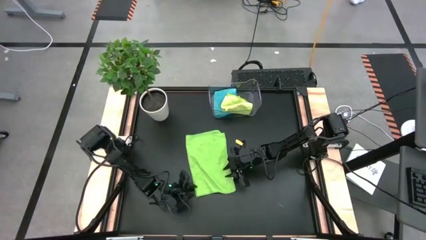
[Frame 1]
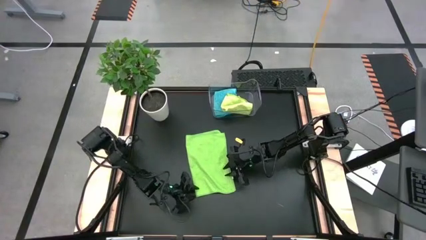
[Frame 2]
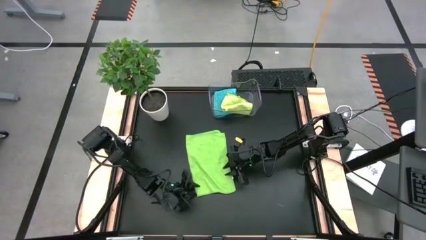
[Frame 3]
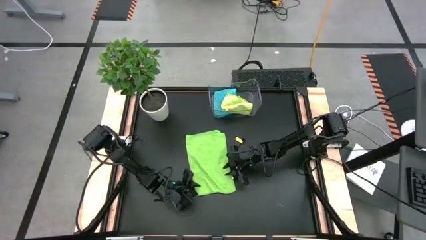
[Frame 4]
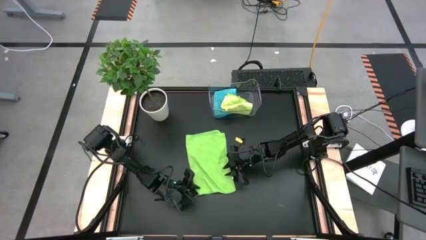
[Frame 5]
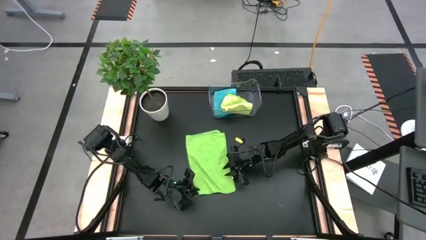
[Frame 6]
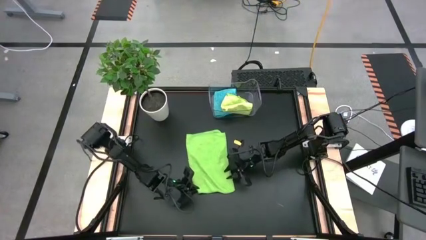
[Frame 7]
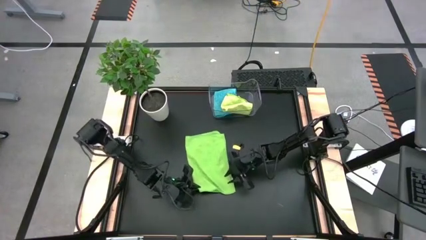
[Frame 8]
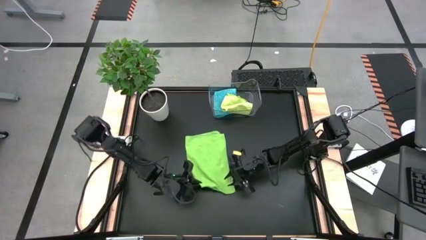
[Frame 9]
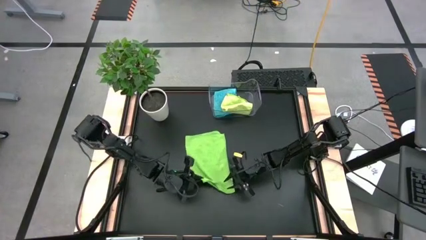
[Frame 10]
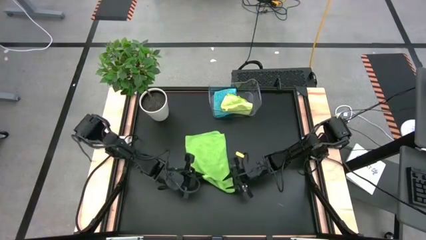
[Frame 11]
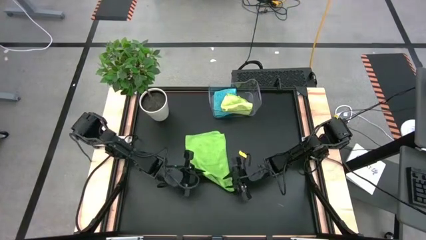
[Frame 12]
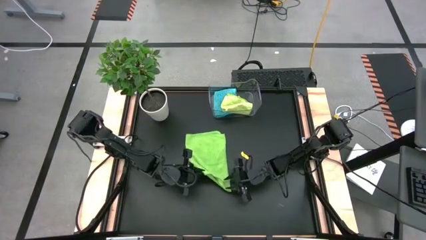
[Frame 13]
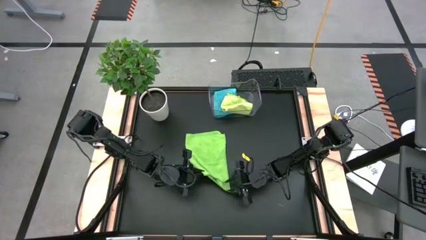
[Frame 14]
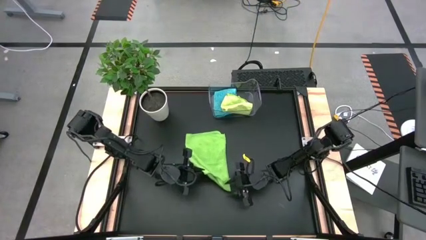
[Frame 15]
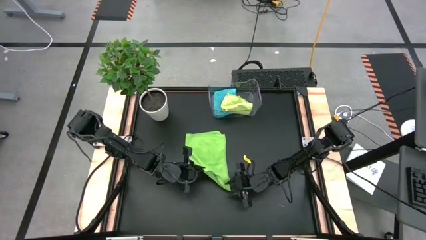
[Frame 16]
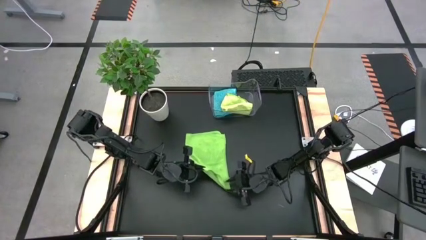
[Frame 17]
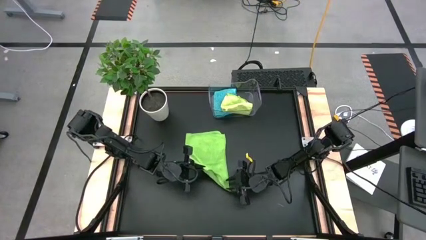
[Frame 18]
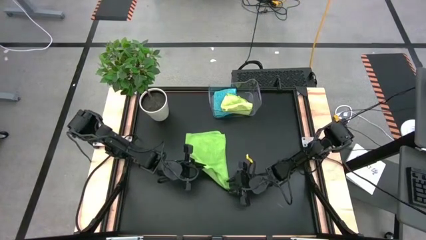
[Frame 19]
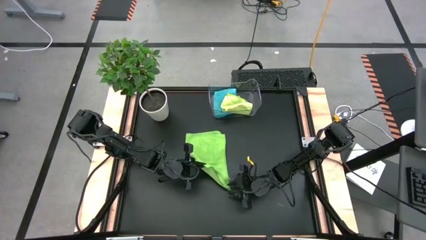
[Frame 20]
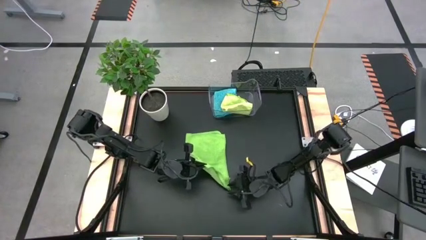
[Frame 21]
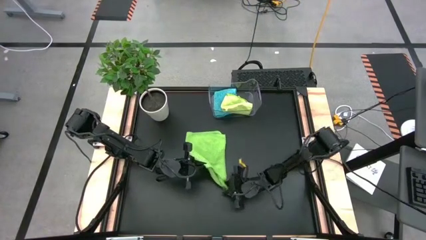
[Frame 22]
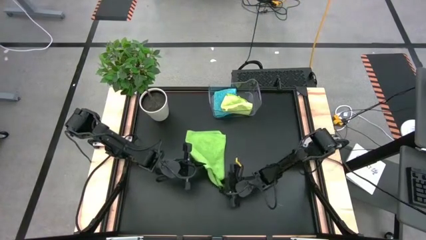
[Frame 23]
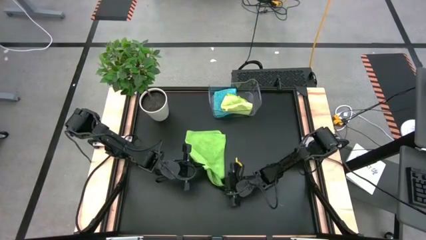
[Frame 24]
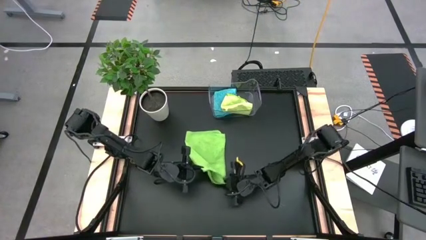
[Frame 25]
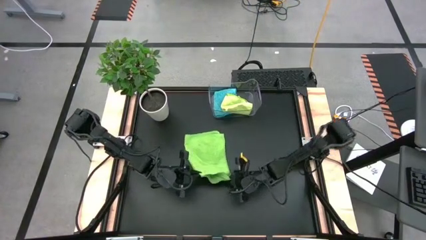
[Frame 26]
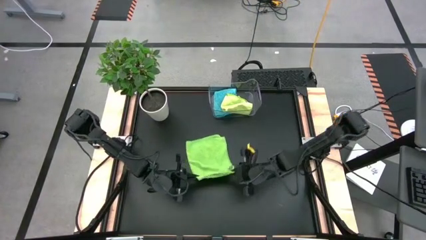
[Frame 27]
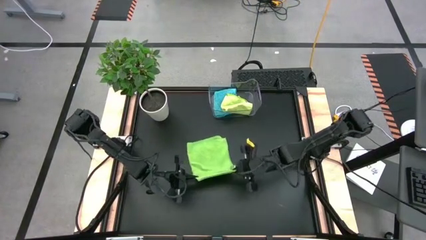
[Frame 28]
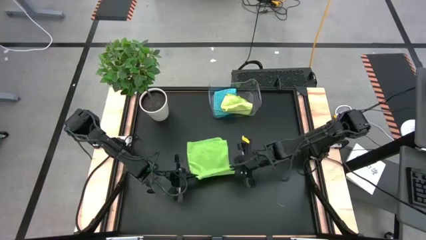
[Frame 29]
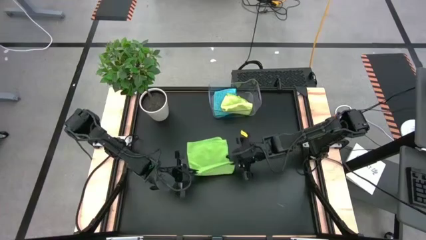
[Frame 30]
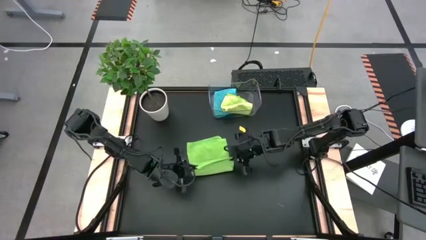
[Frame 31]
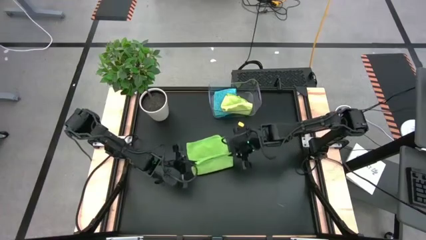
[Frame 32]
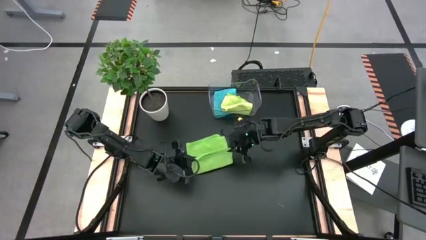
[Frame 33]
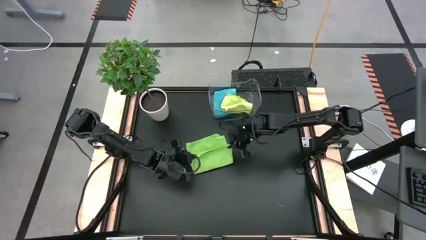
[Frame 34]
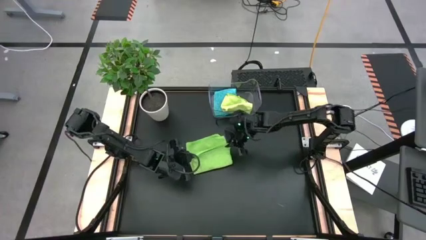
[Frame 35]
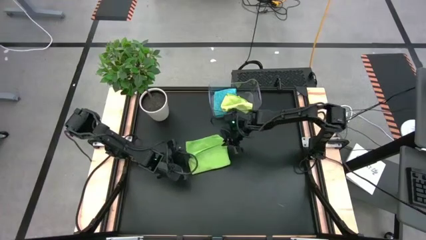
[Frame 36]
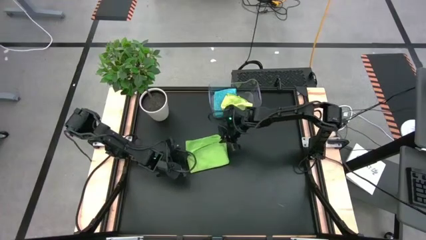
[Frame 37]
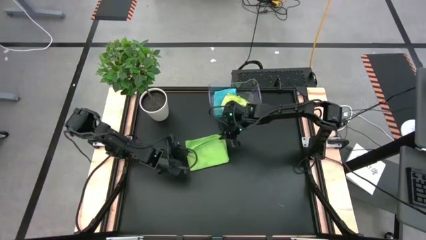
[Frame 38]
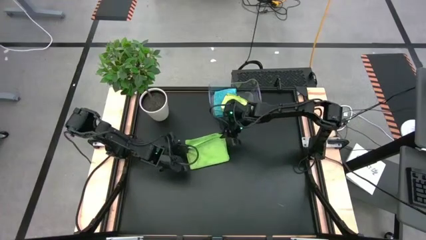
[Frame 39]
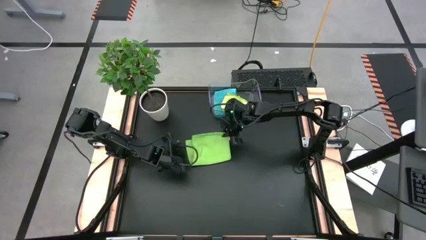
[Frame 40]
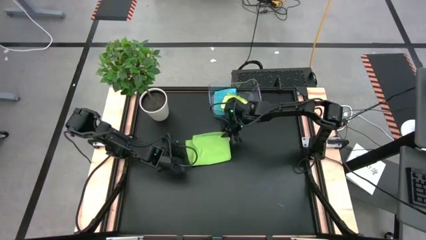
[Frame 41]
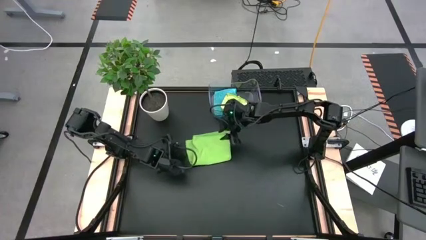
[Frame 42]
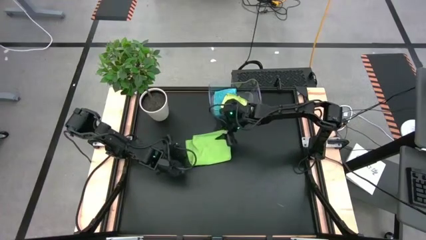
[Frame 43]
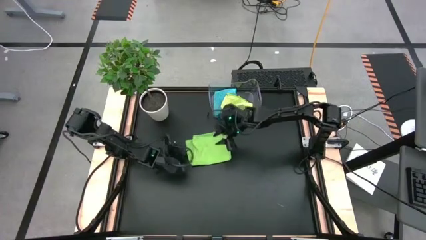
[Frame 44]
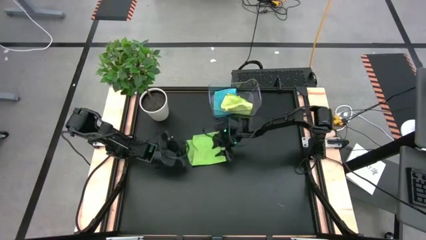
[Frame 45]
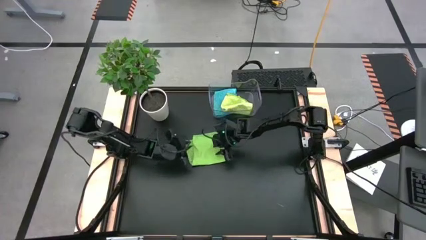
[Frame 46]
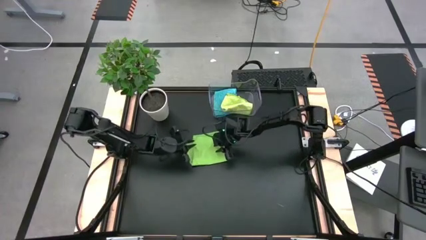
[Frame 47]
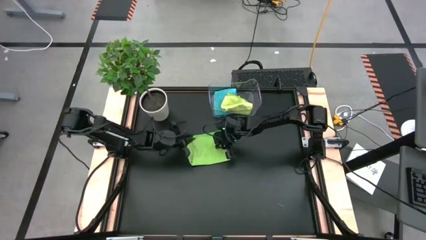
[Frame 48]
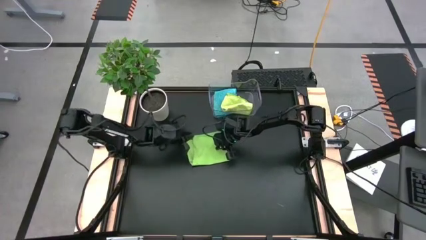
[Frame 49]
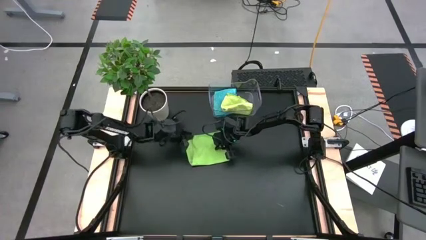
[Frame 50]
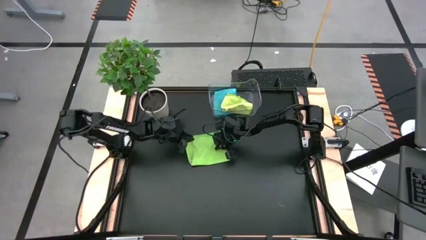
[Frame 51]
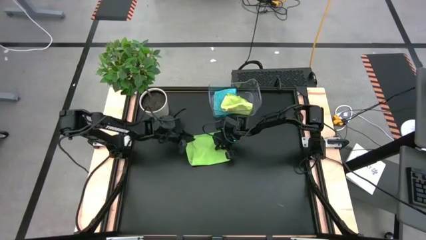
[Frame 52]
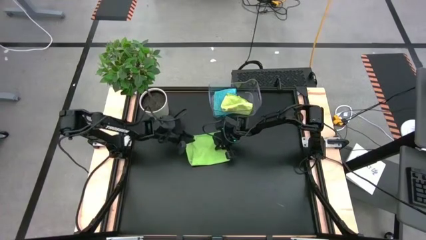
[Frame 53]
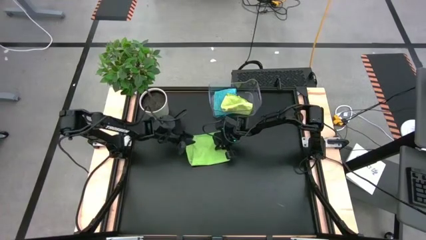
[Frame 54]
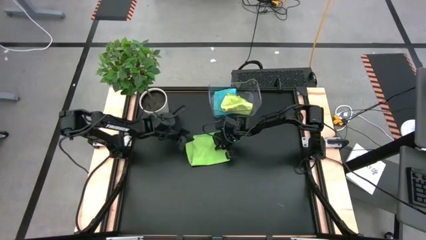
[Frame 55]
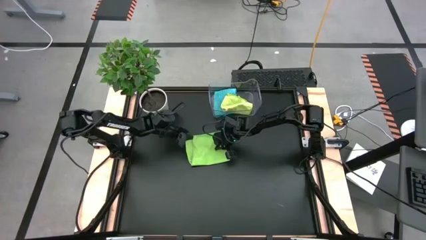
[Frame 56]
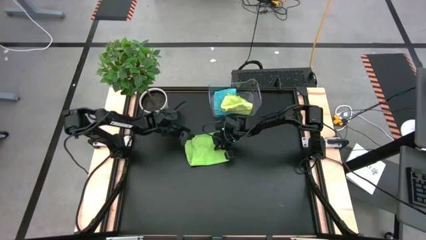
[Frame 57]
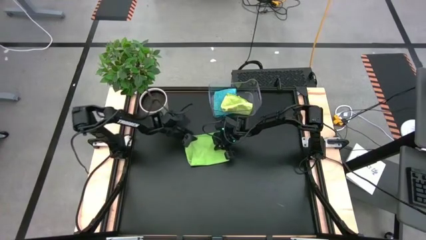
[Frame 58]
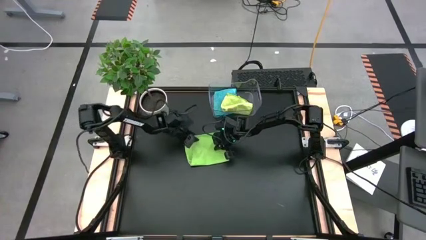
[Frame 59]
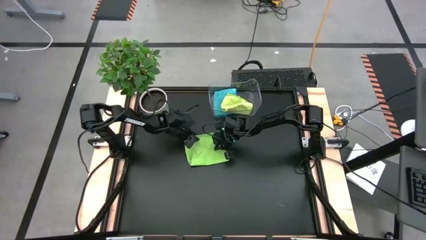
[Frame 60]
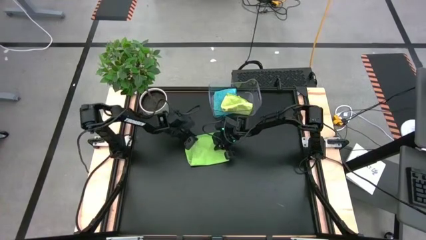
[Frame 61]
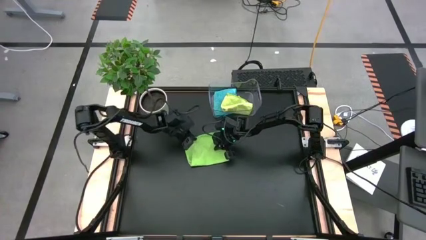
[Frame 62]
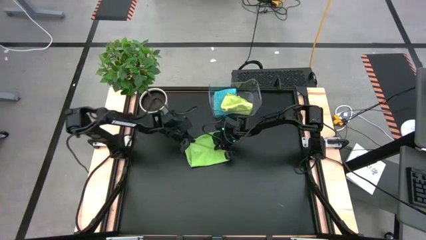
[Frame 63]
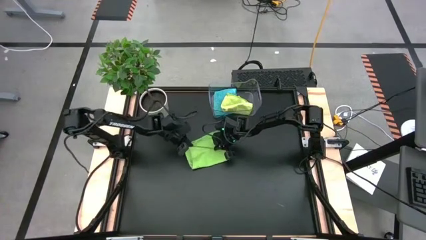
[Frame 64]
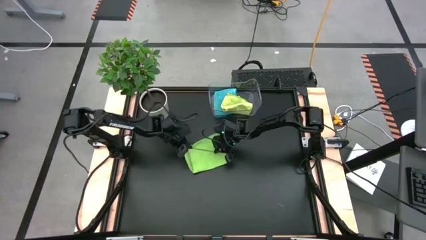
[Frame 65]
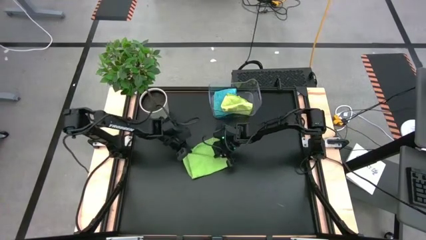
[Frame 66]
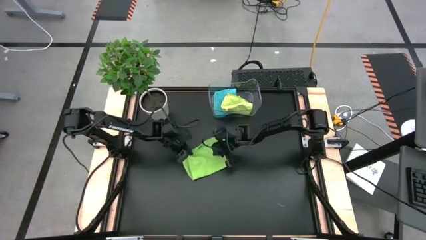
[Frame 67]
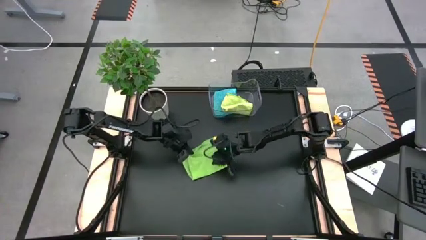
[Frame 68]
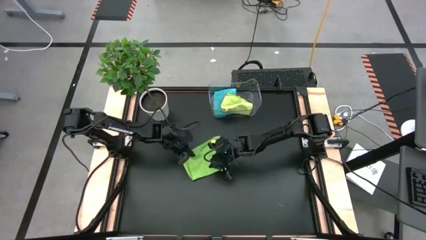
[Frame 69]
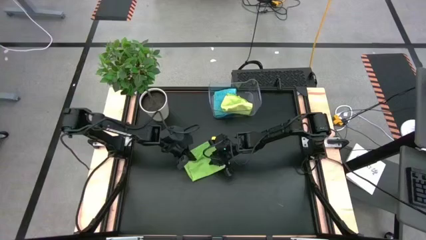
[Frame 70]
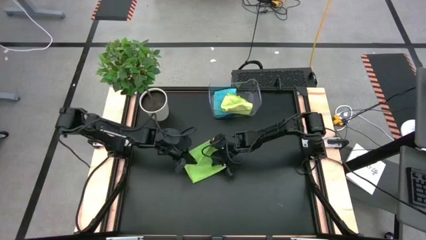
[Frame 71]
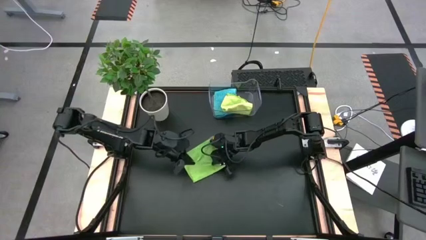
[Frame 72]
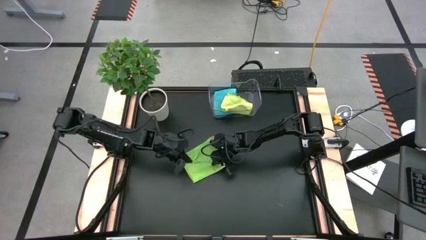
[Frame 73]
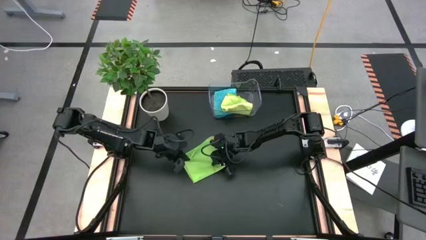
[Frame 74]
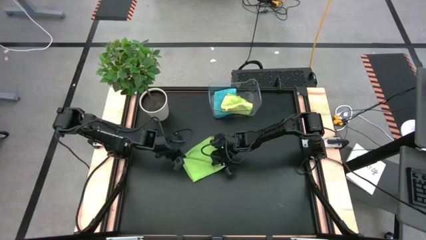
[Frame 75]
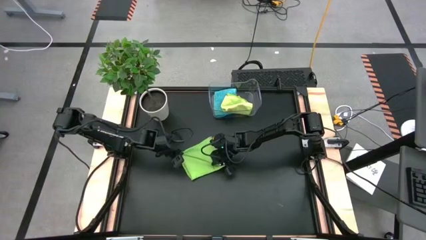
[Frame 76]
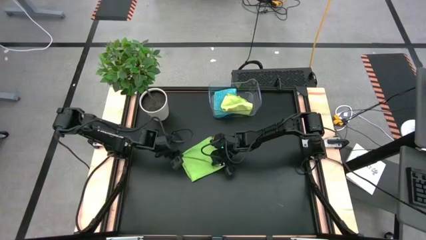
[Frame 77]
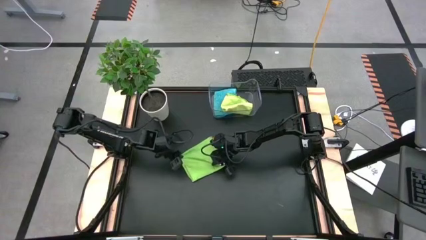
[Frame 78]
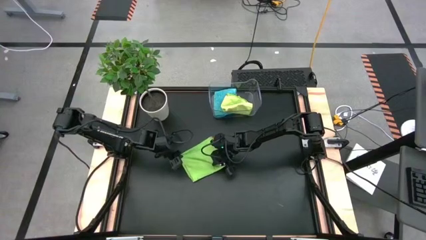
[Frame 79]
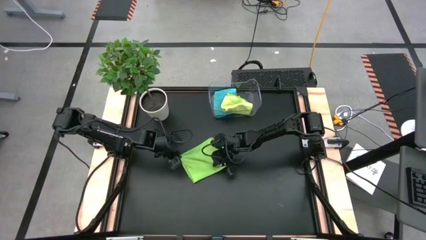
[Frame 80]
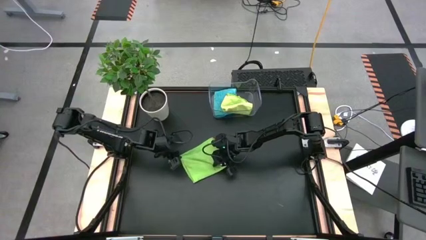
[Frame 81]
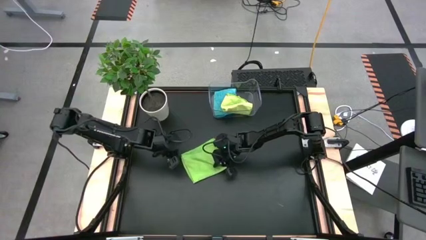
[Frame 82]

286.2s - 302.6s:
Task: Fold microfiber towels
Fold the green microfiber cloth
